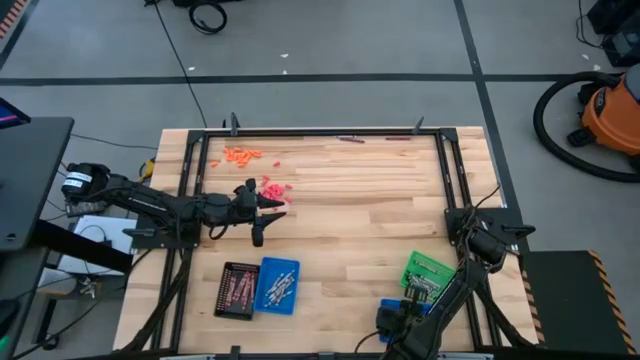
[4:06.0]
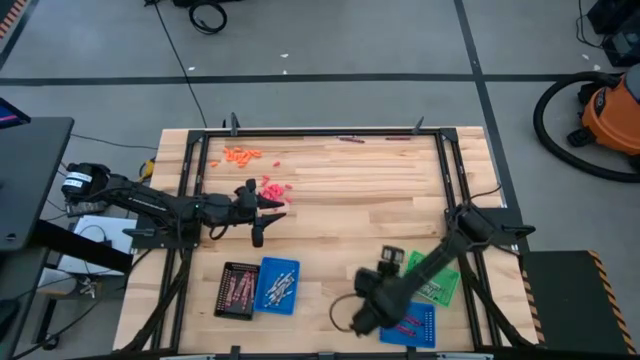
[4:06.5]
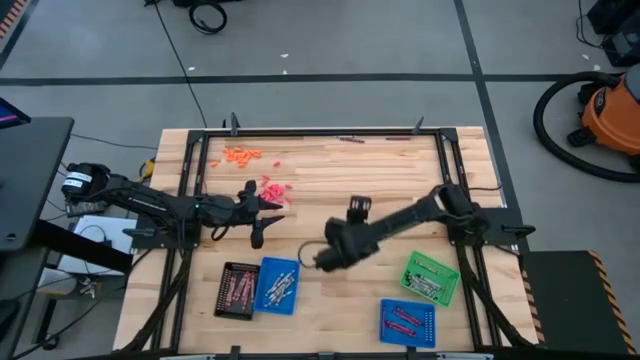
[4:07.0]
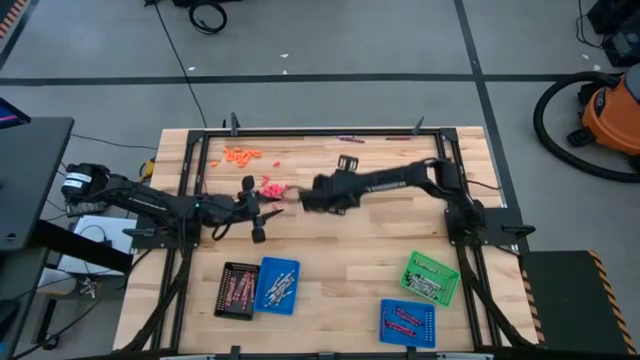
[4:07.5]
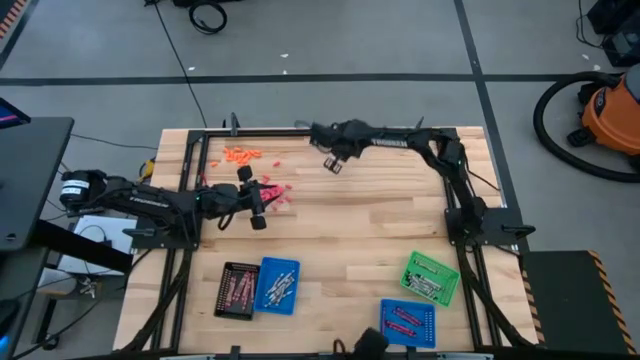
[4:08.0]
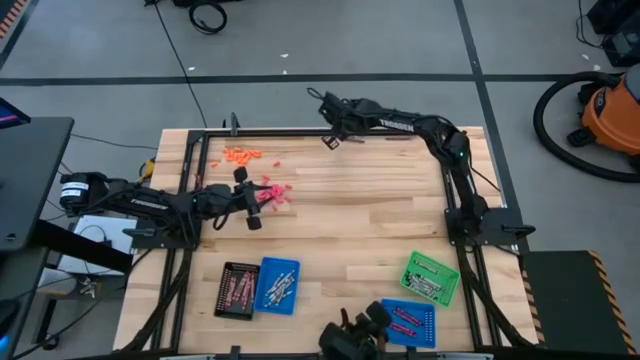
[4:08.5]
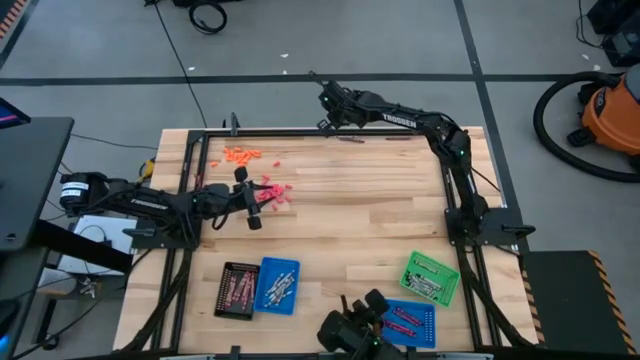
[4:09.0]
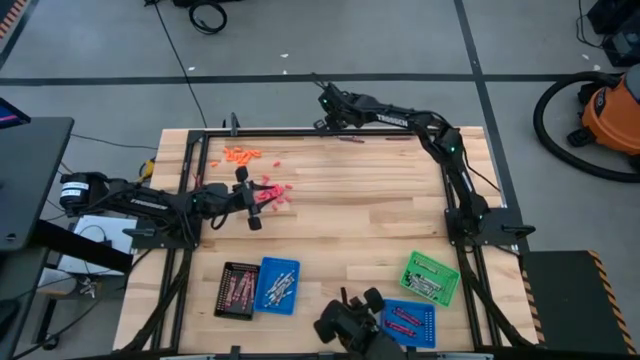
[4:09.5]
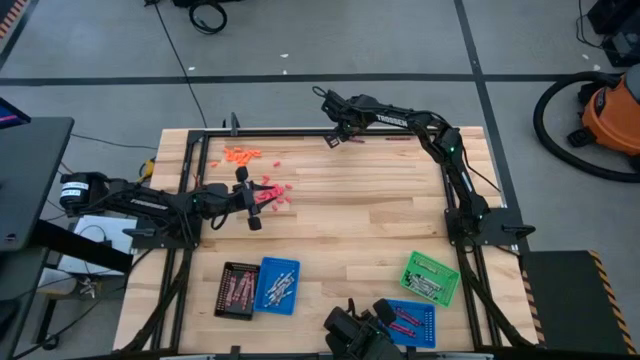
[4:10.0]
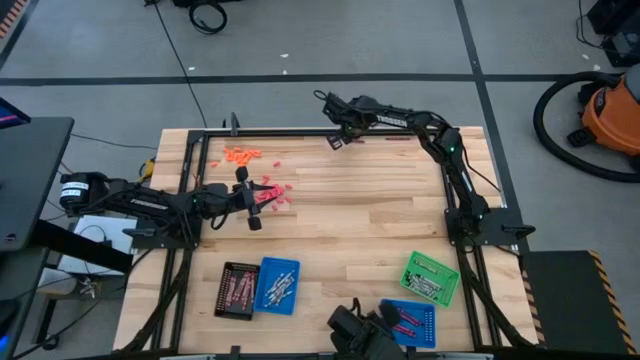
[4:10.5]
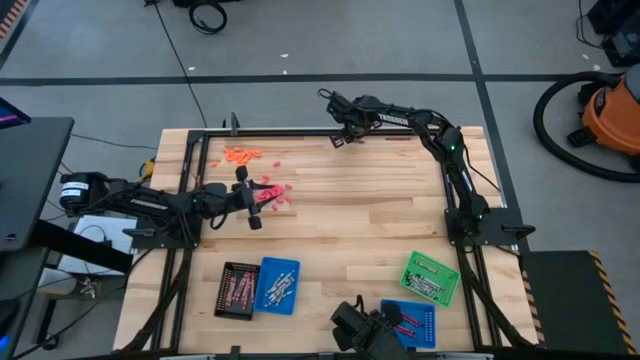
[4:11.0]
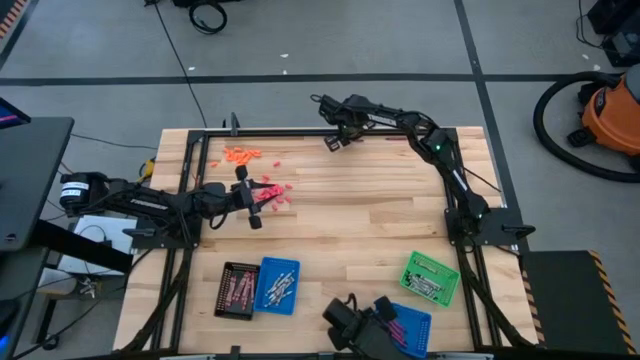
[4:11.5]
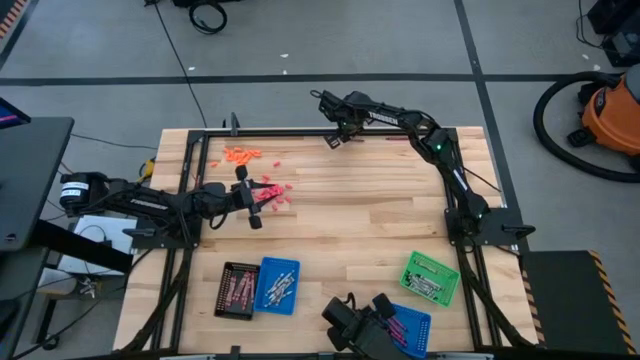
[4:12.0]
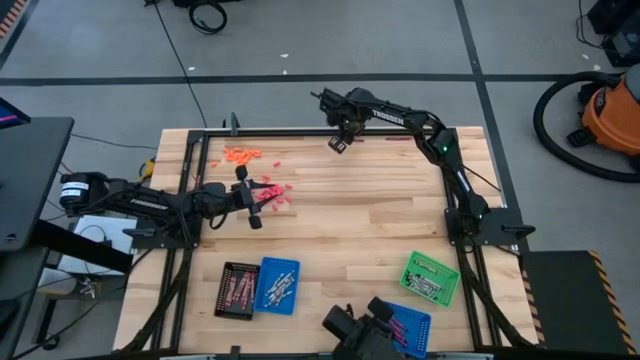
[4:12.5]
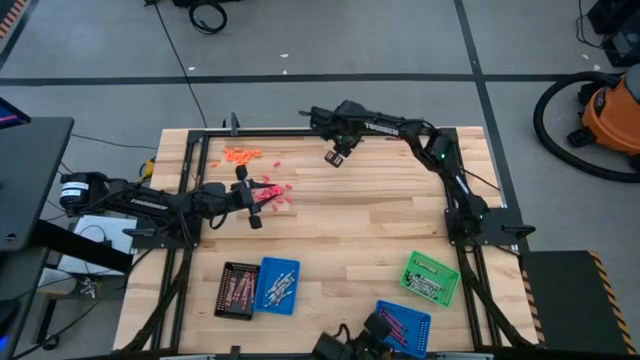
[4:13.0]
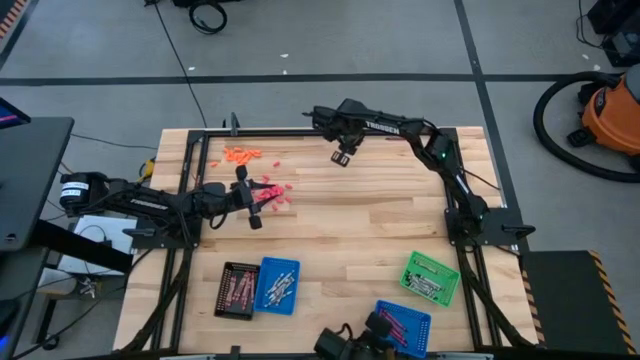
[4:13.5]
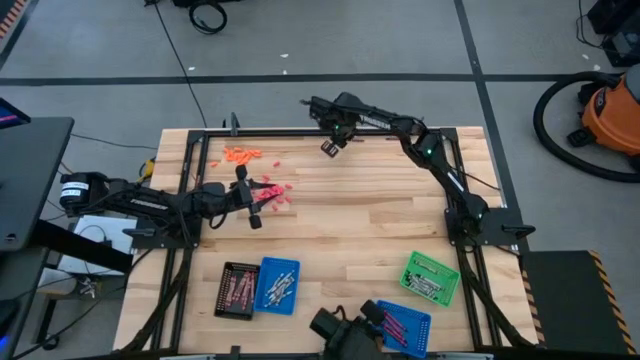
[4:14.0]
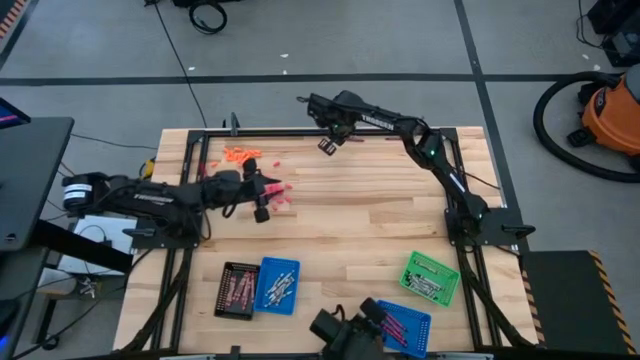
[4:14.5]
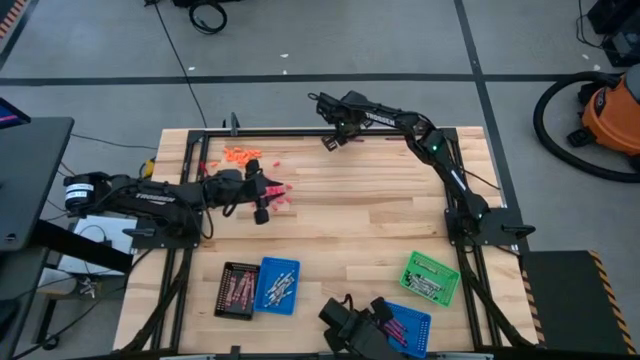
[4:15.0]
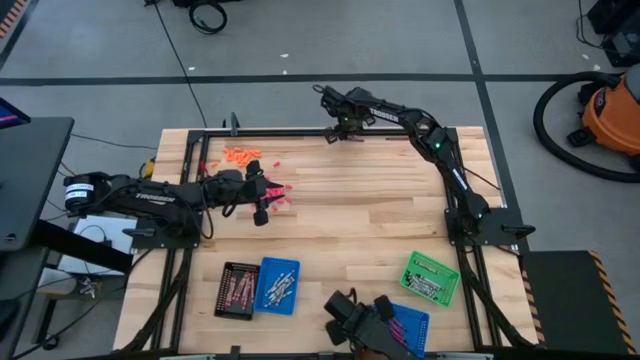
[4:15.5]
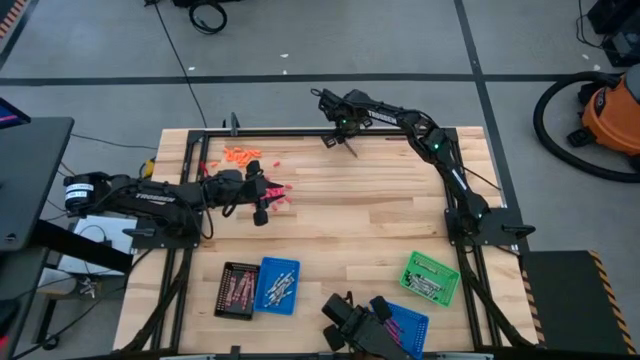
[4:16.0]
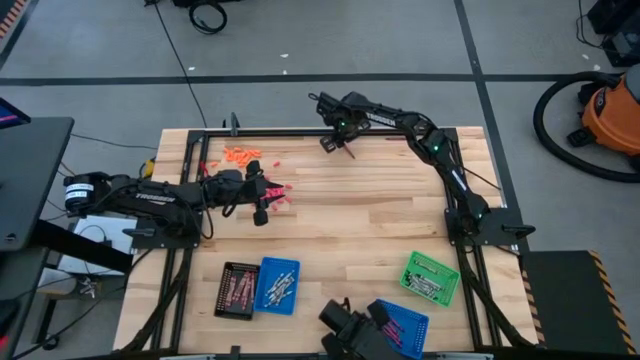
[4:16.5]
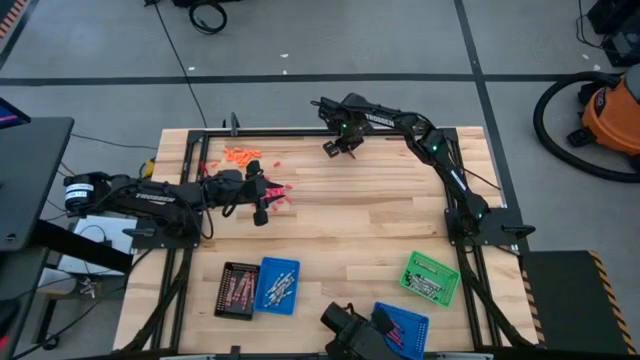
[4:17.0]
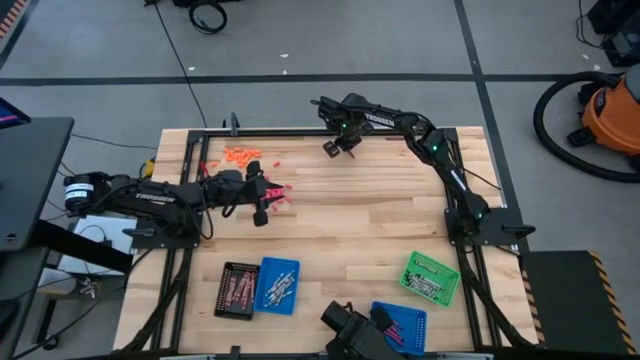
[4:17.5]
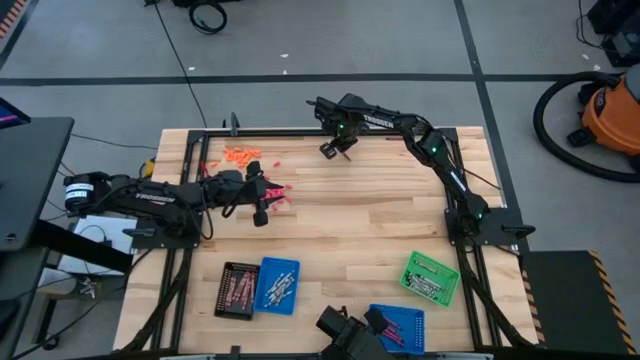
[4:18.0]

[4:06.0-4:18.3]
Task: Sort crayons
Put the red crayon into the right blue bin

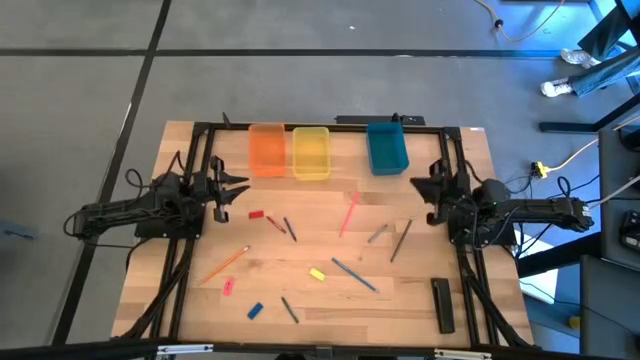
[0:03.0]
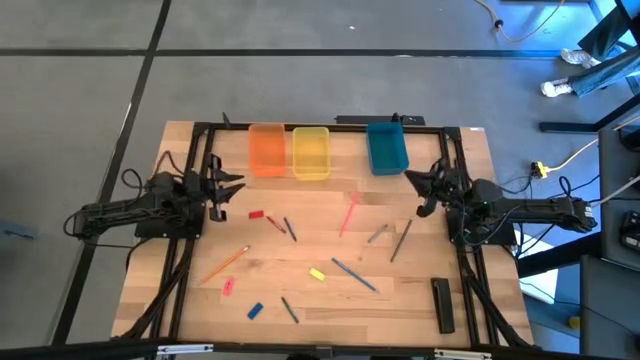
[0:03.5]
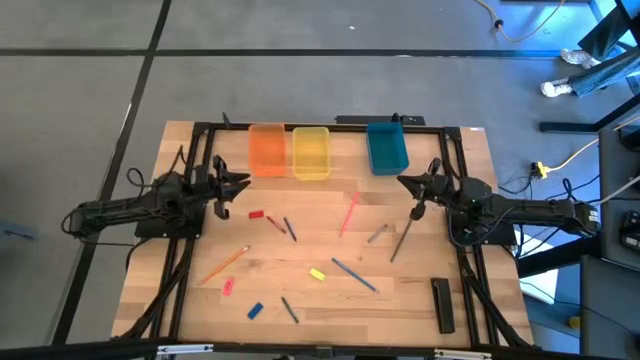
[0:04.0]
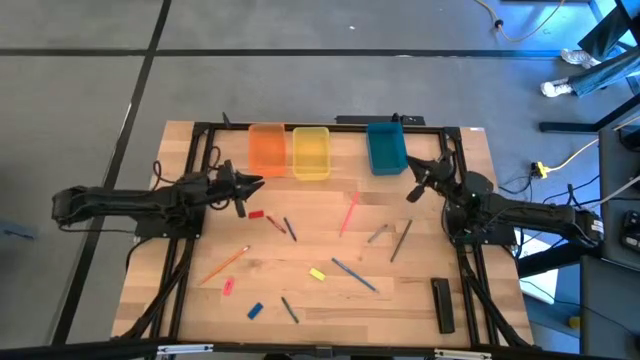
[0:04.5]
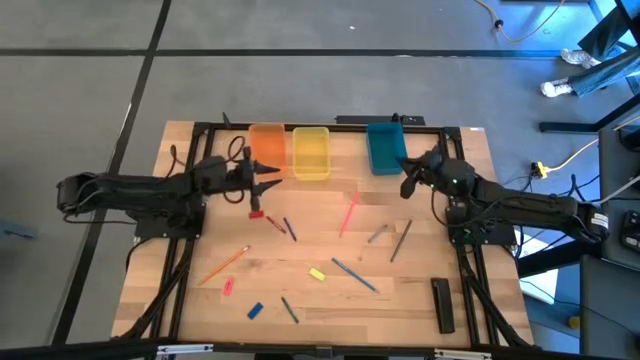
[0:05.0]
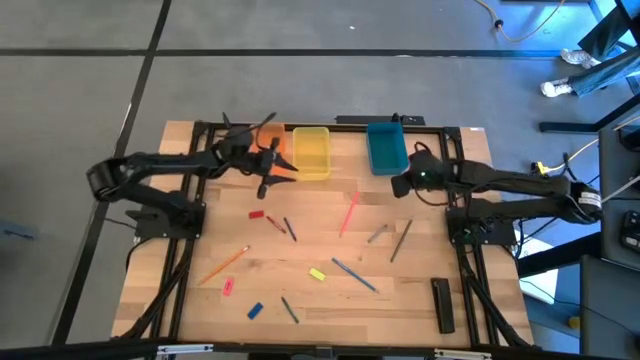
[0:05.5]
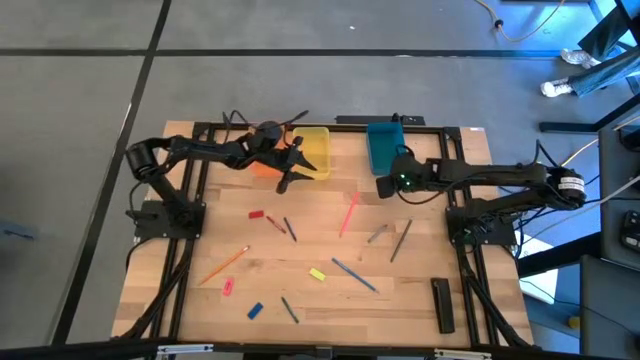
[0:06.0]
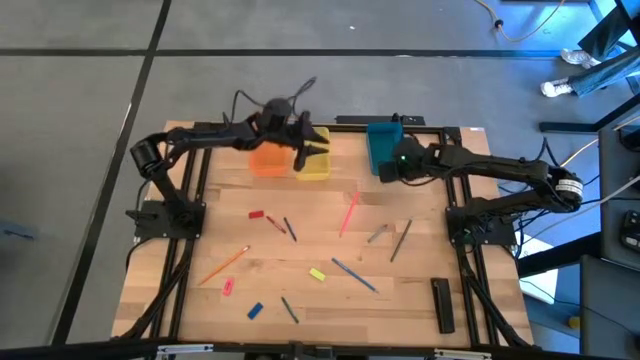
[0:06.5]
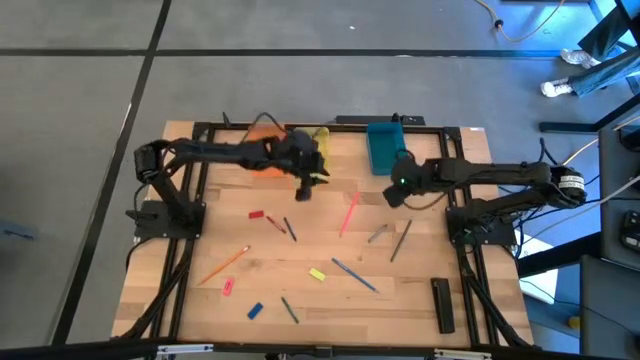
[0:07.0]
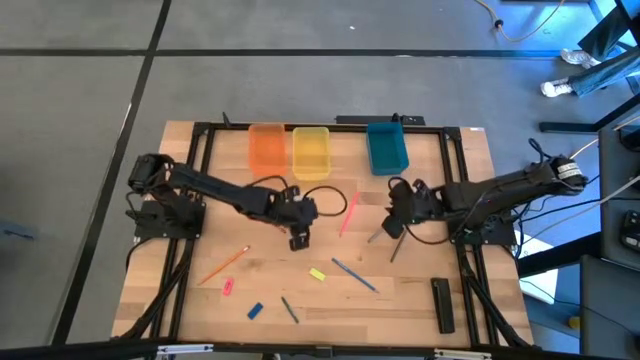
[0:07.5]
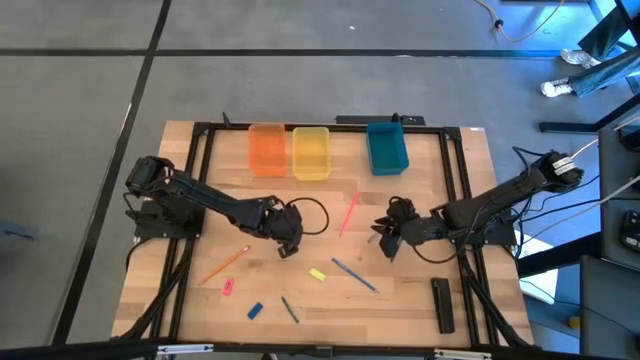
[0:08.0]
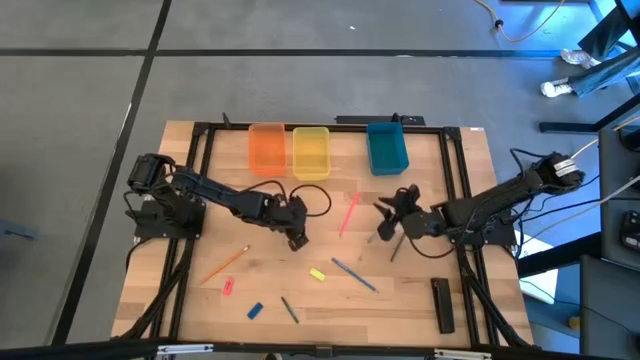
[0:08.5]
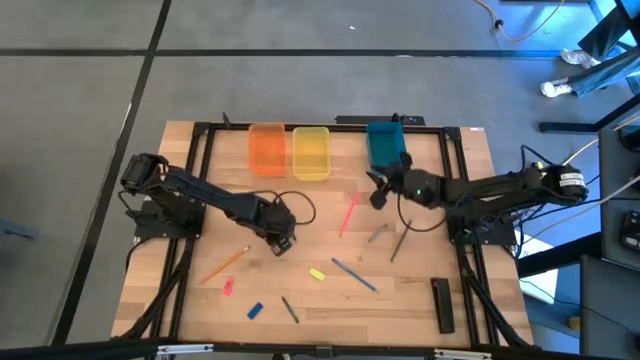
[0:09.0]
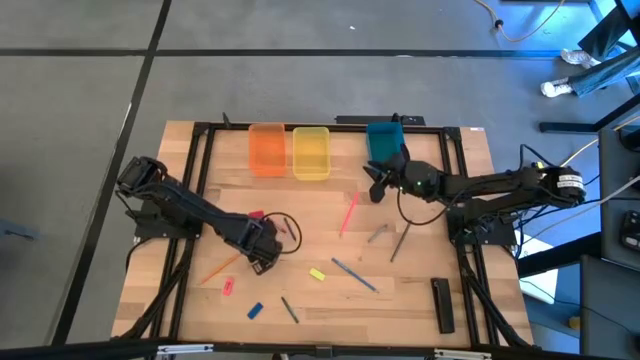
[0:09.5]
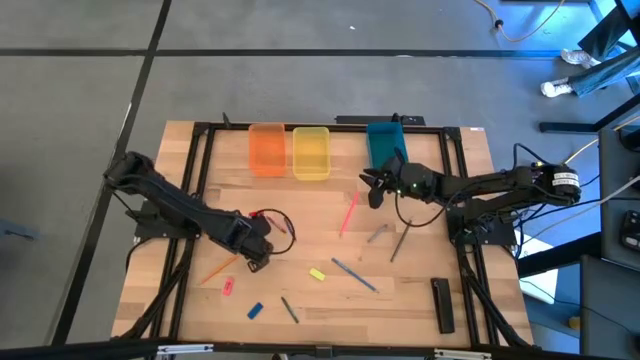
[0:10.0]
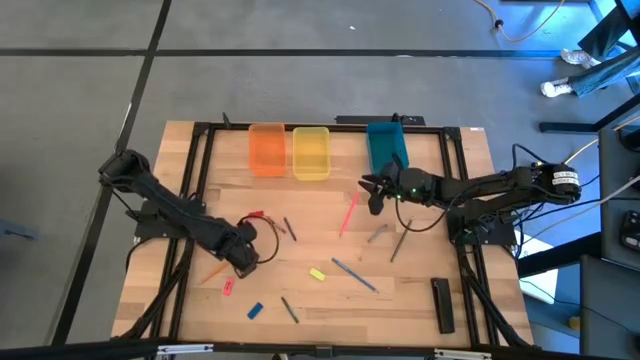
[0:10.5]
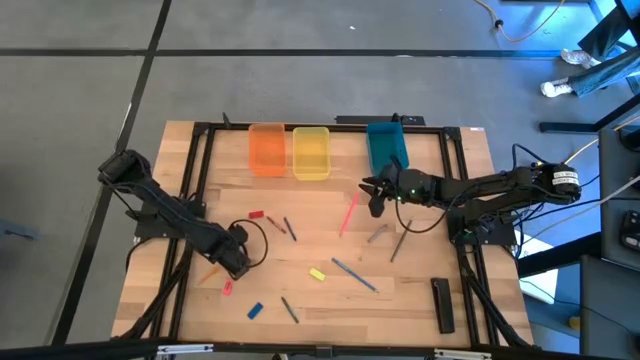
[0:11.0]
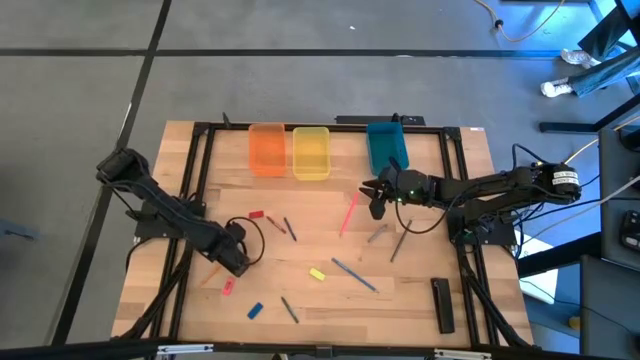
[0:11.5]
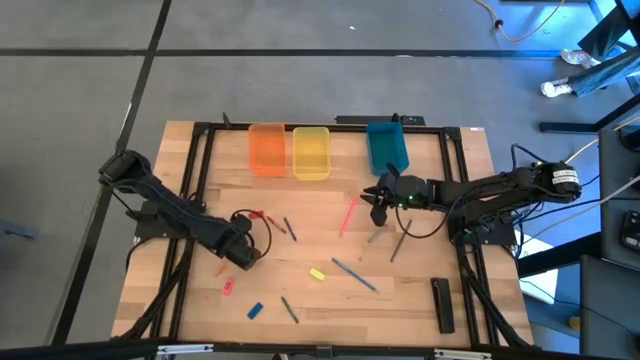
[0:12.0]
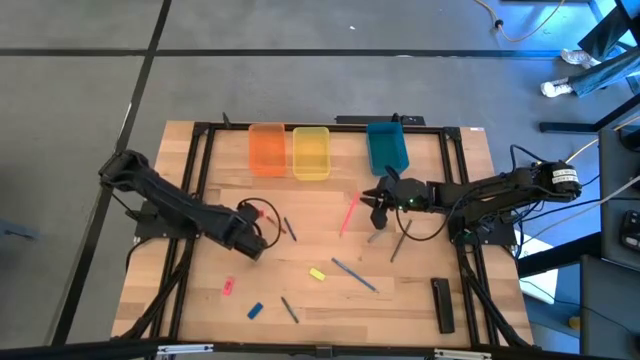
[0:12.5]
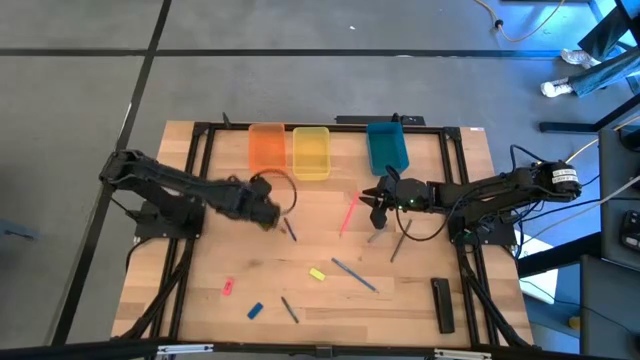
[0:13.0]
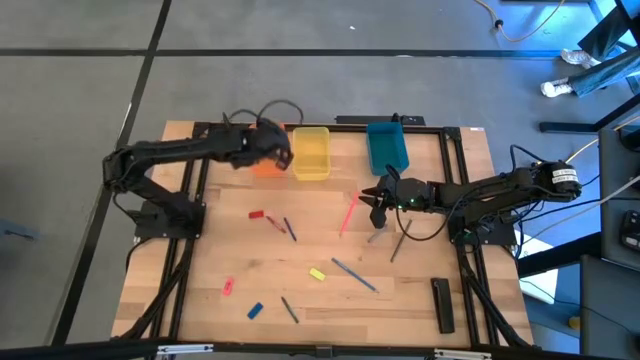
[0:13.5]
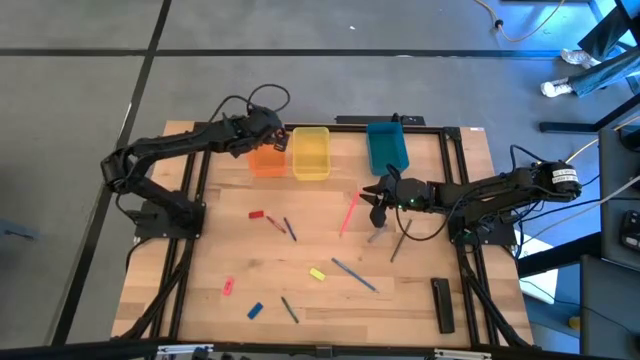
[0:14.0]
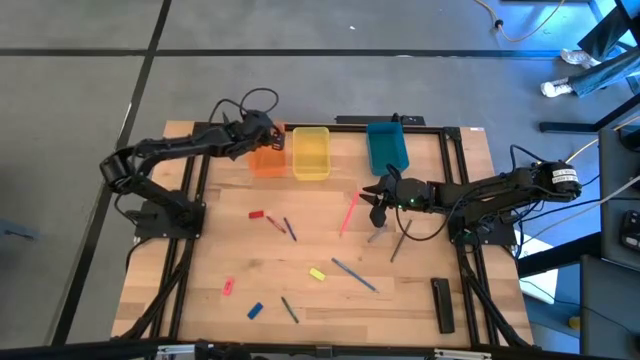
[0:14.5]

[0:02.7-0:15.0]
Task: Sort crayons/erasers/pens/pencils in bins
Put the orange pencil into the orange bin
